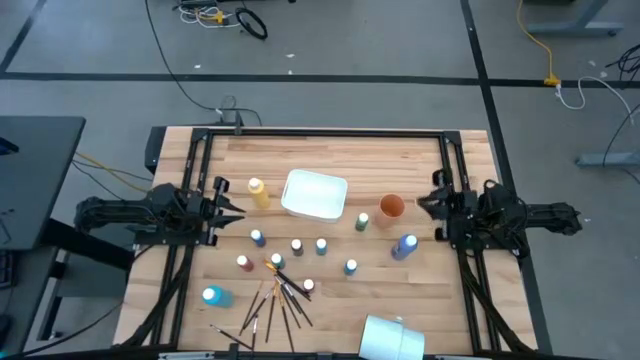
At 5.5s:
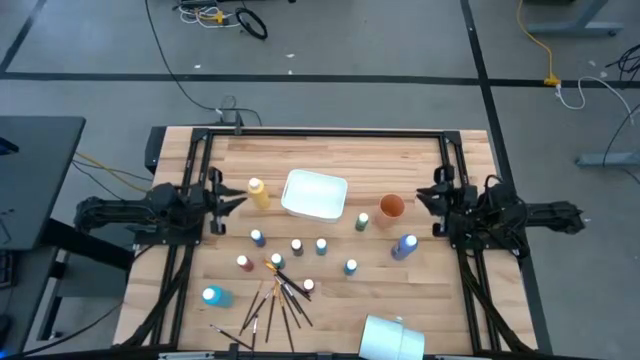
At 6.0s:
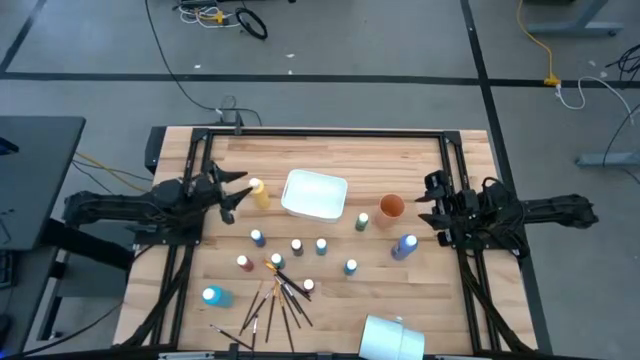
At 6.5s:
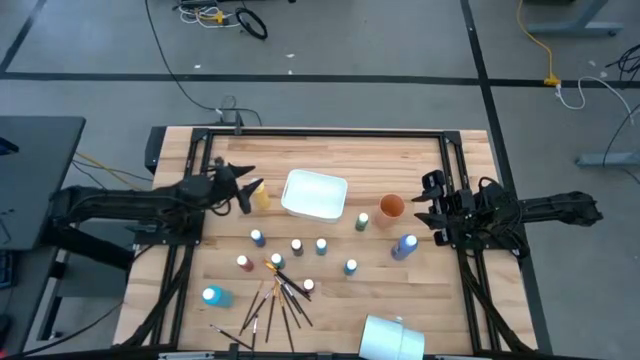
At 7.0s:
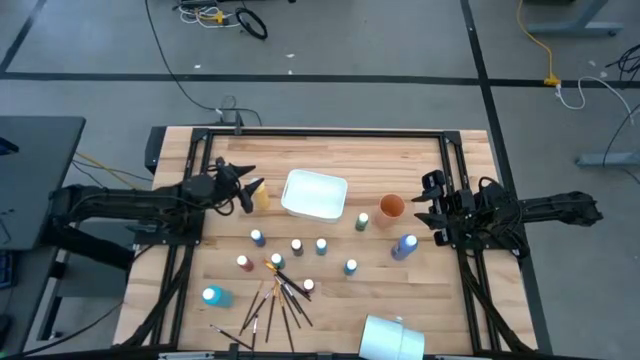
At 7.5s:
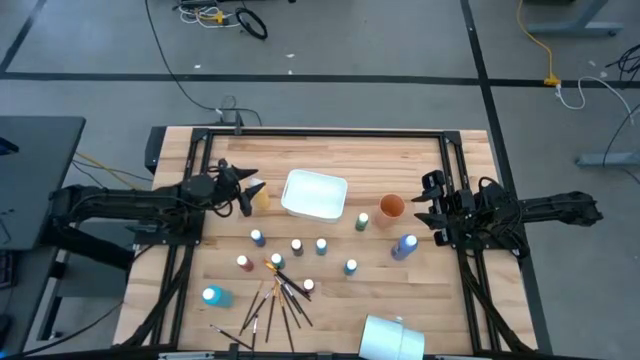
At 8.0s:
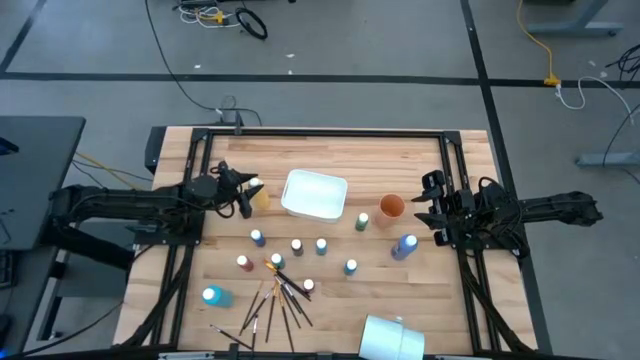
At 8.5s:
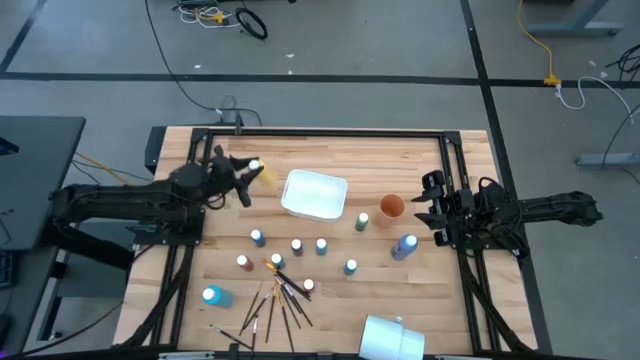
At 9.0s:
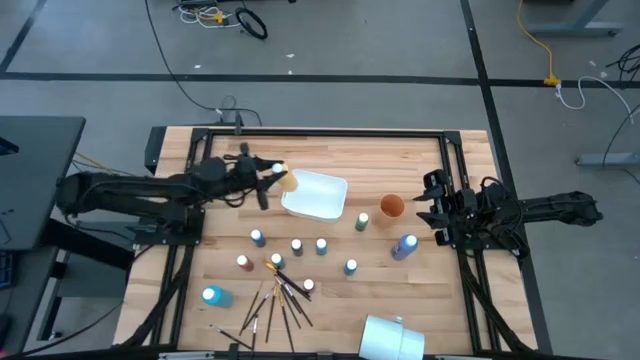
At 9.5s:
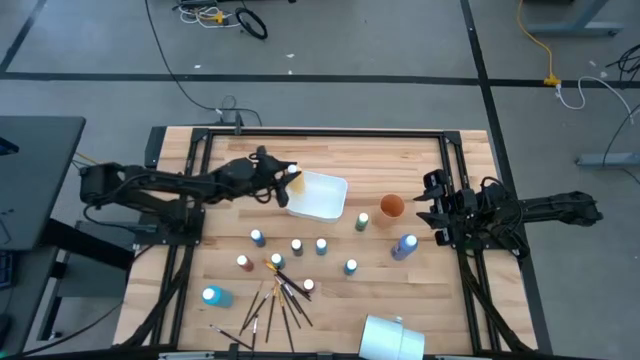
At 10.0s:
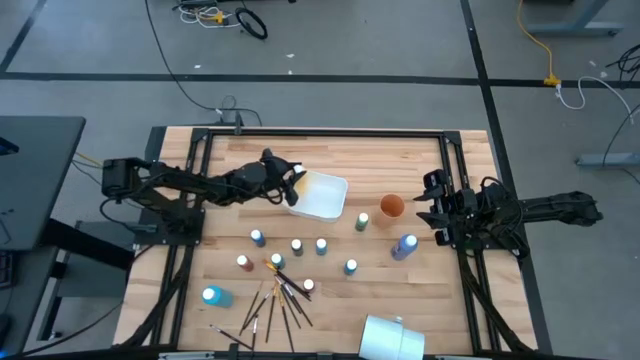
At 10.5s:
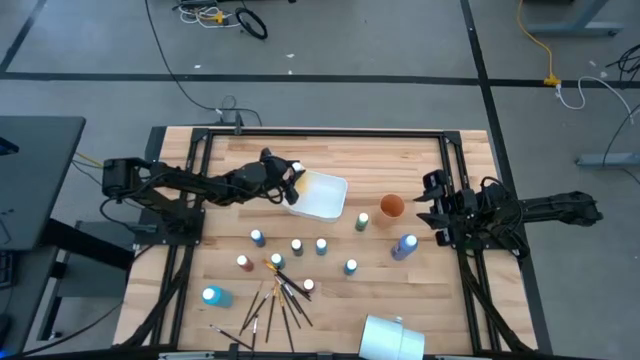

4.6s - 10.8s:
Task: Pick & Place Paint Supplies
Put the yellow paint bottle into the white bin

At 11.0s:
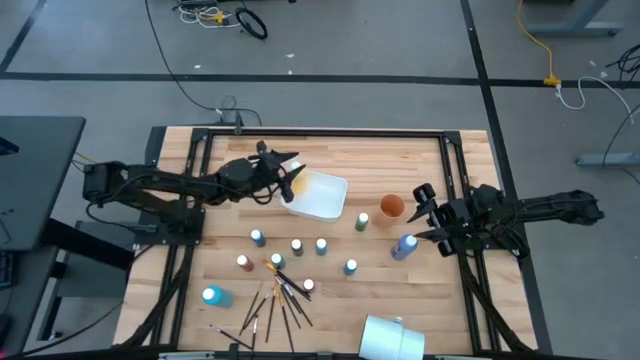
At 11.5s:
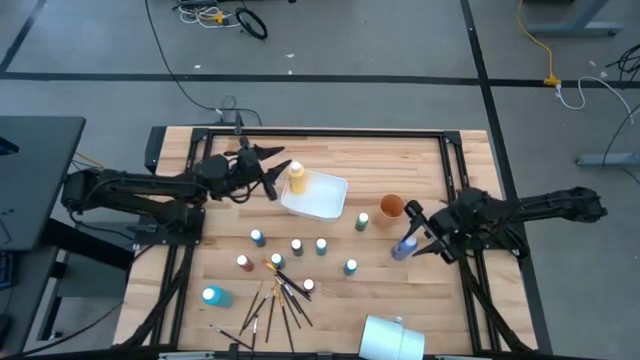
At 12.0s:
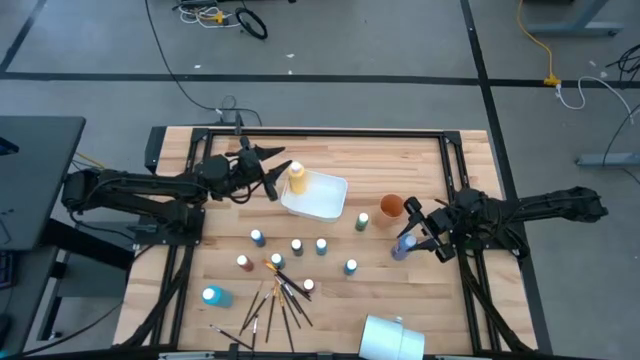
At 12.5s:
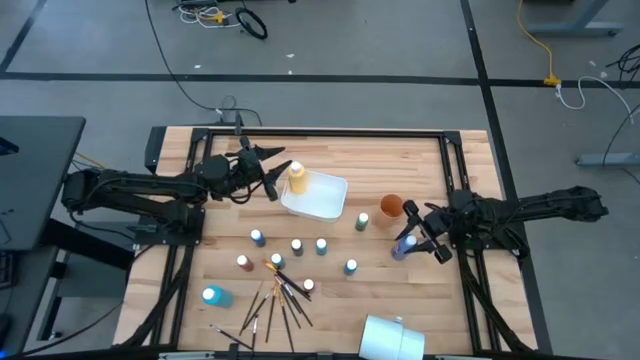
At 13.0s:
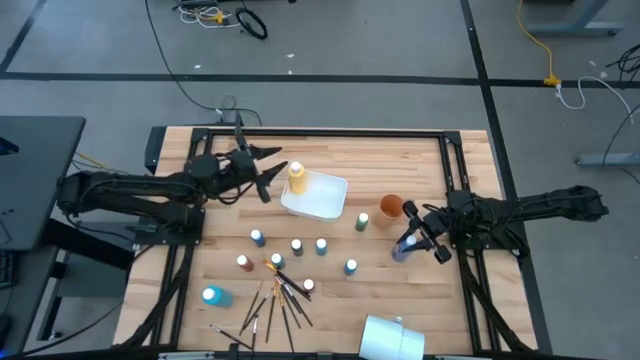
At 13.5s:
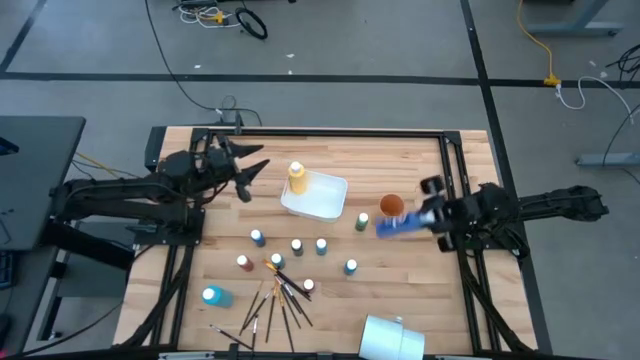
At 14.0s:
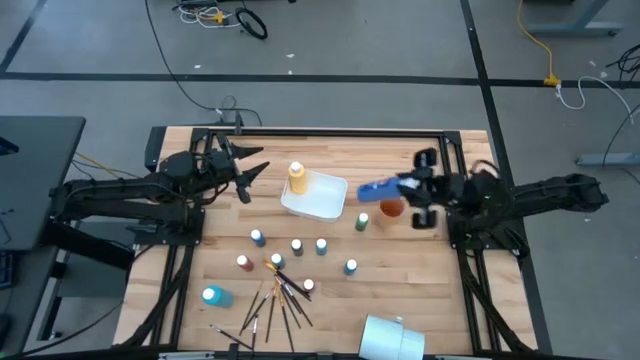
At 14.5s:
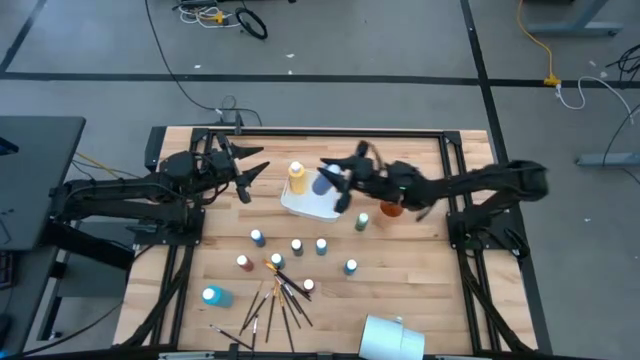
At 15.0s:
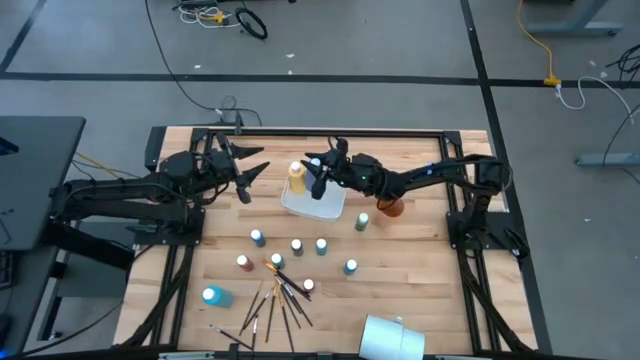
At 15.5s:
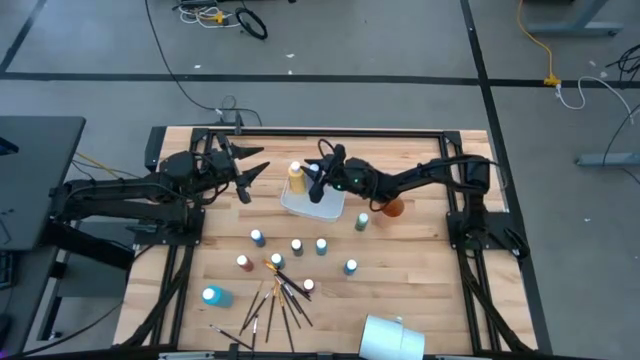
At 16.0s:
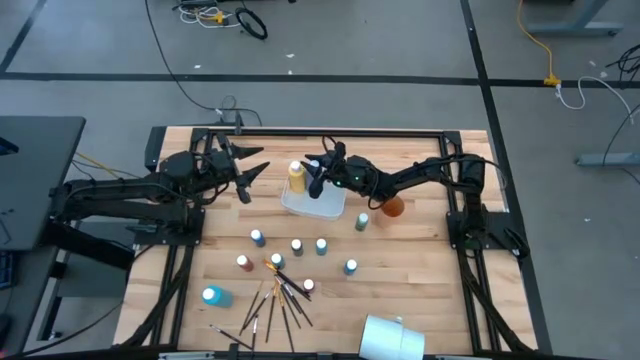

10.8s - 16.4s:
Put the large blue paint bottle into the white bin

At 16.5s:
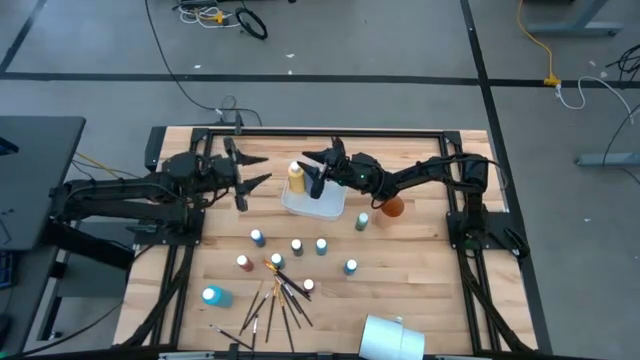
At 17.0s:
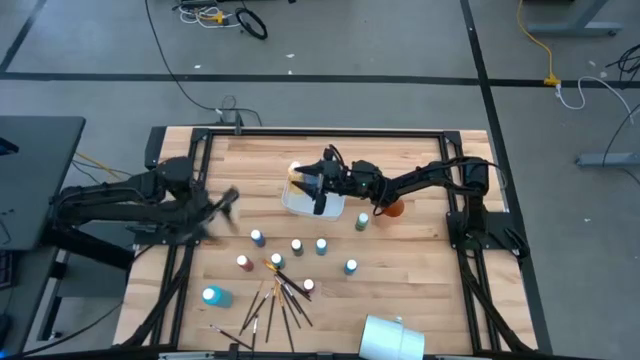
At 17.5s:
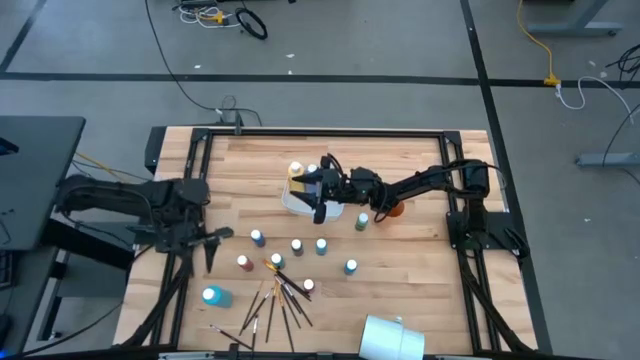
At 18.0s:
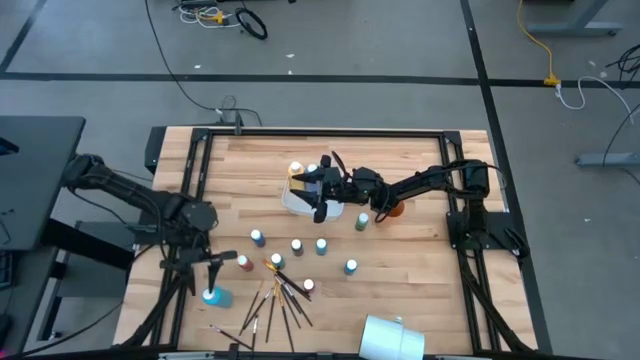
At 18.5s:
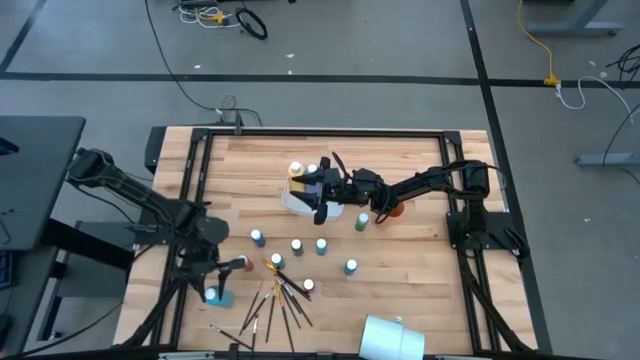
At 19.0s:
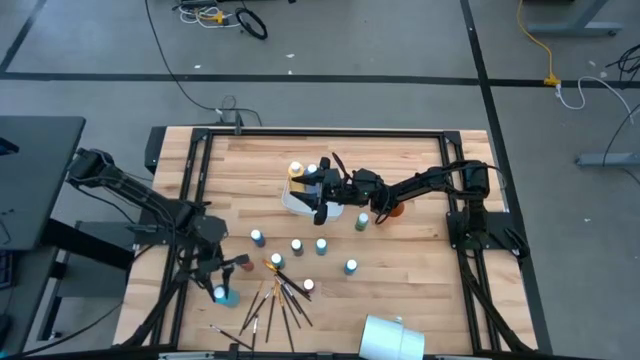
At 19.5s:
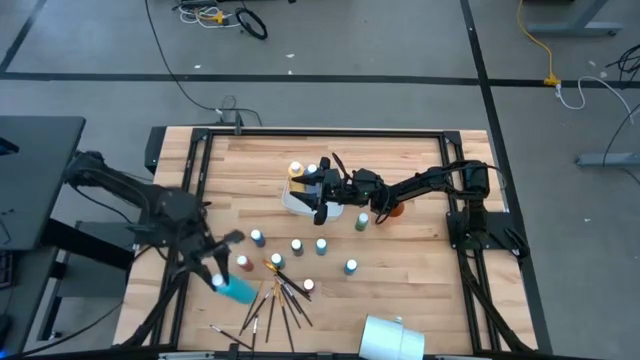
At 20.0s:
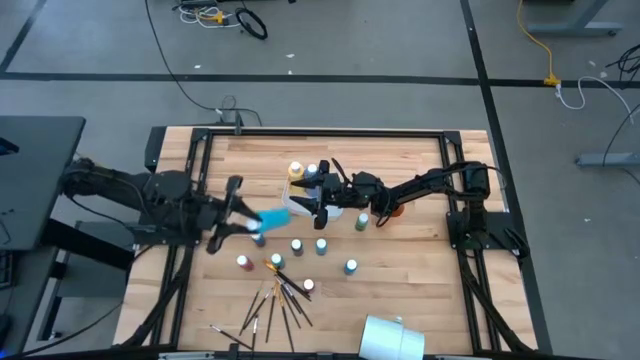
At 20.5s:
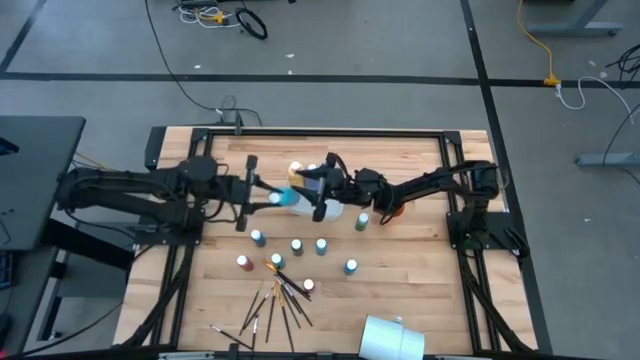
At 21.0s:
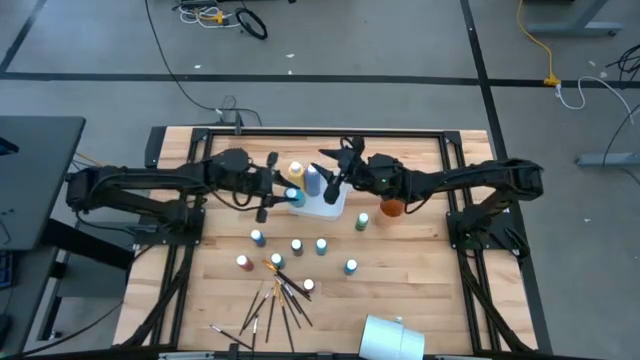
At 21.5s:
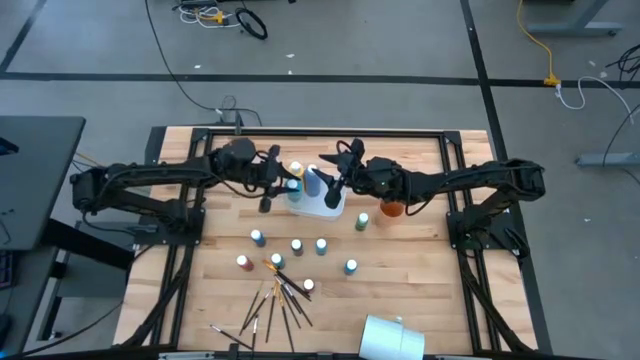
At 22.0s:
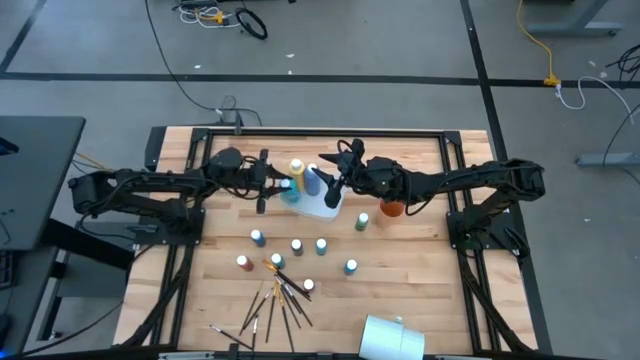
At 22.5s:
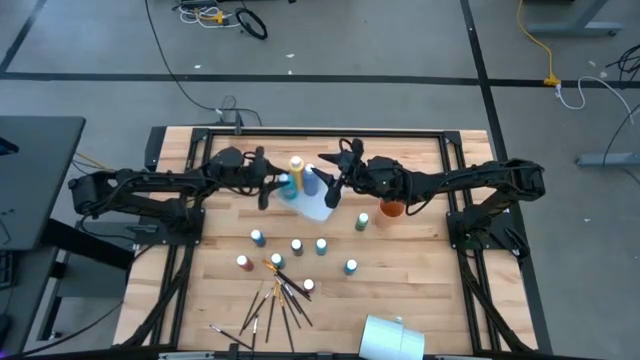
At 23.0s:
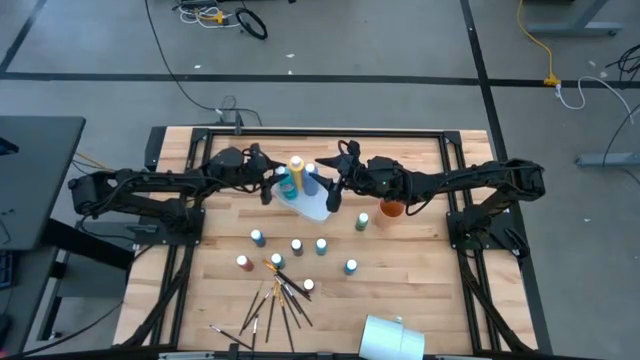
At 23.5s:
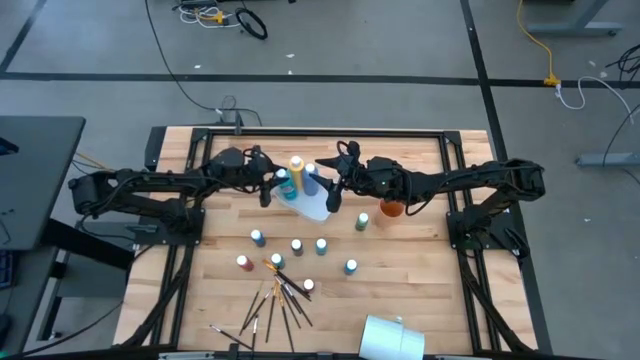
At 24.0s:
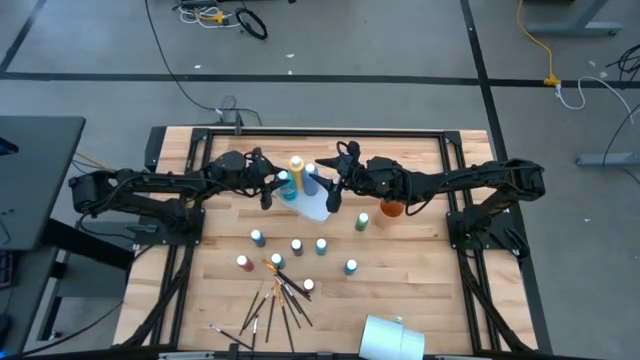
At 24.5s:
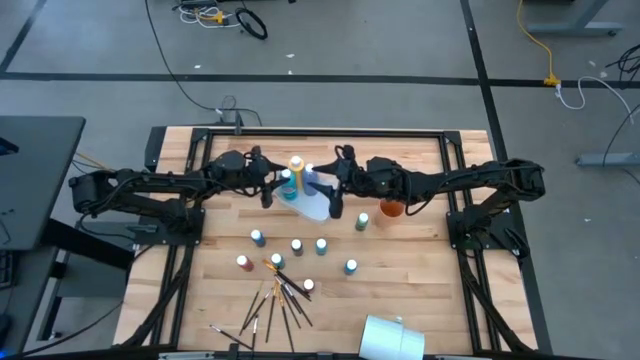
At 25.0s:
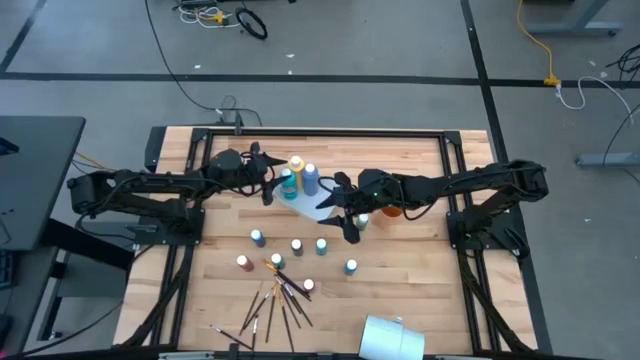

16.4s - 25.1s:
Put the large light blue paint bottle into the white bin

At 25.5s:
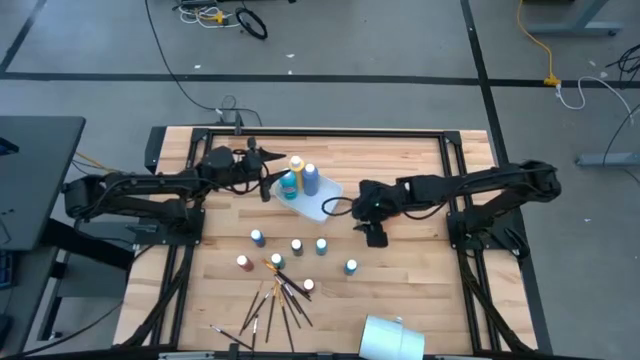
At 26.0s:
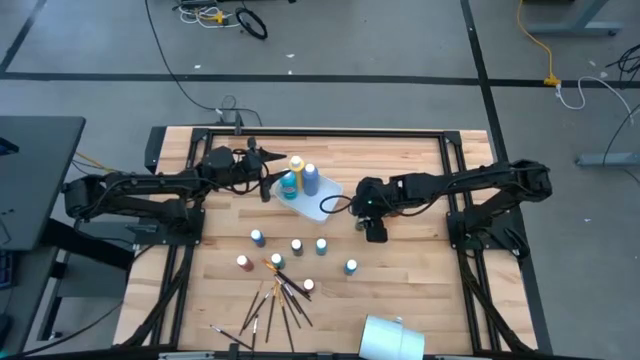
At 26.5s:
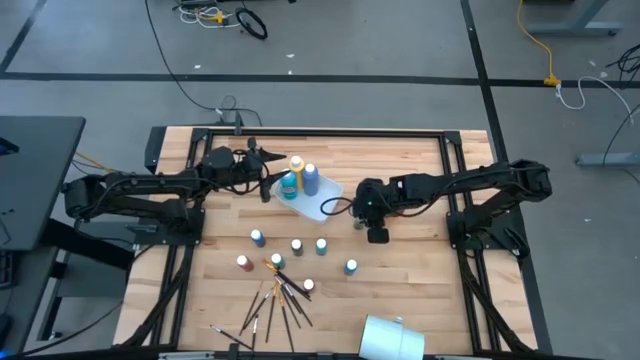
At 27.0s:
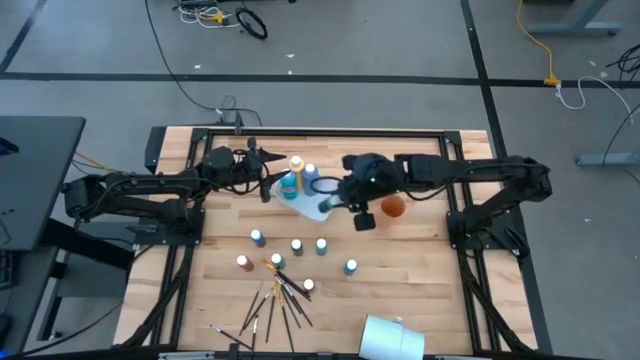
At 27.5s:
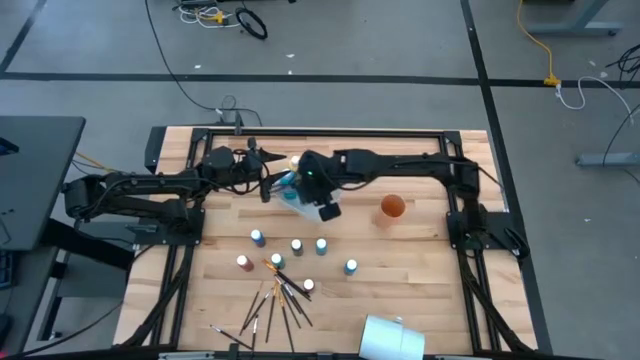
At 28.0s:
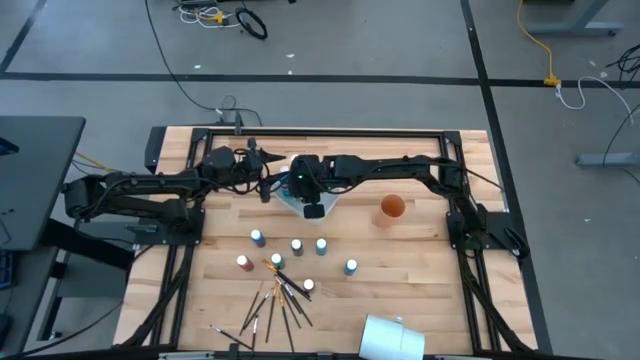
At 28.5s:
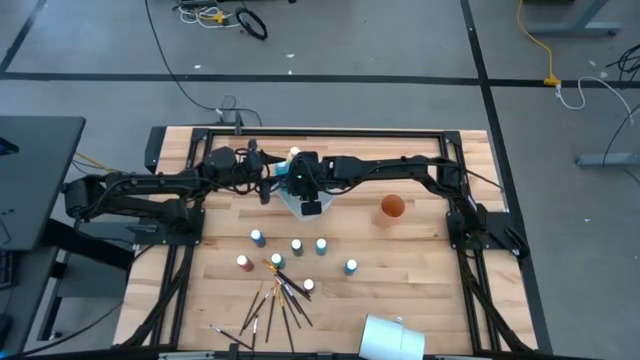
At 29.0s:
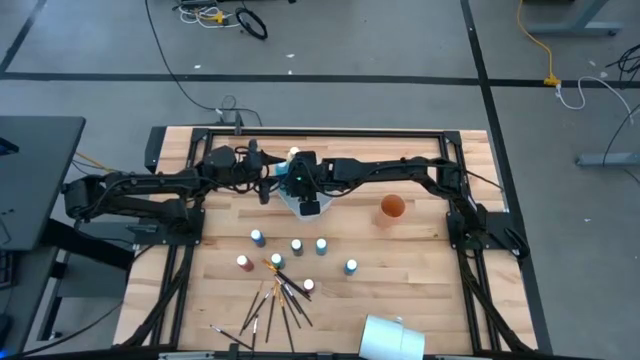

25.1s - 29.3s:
Put the green paint bottle into the white bin
